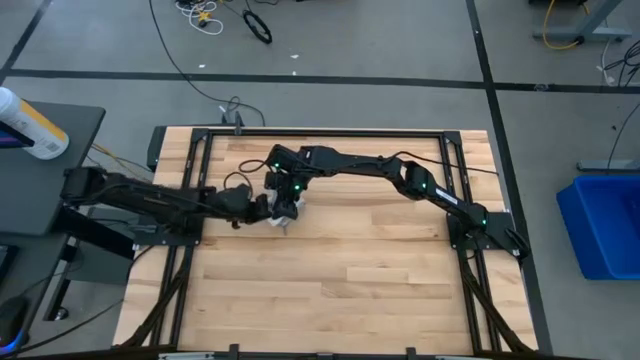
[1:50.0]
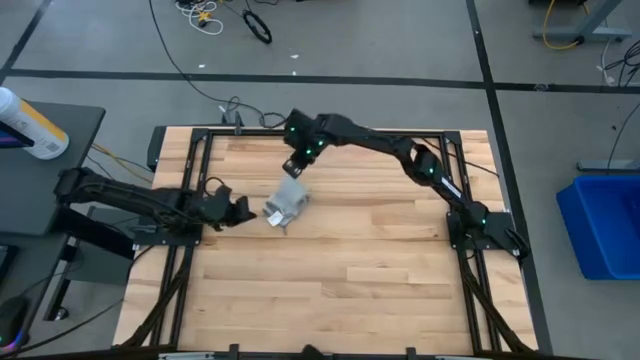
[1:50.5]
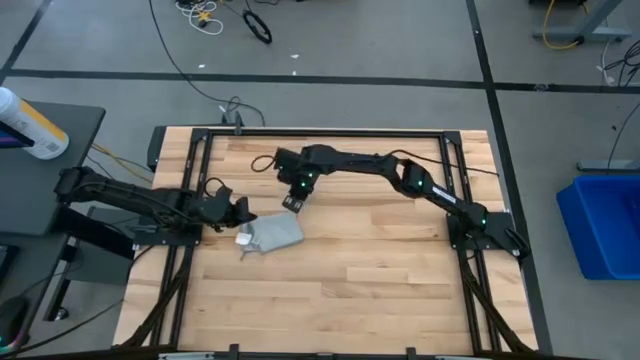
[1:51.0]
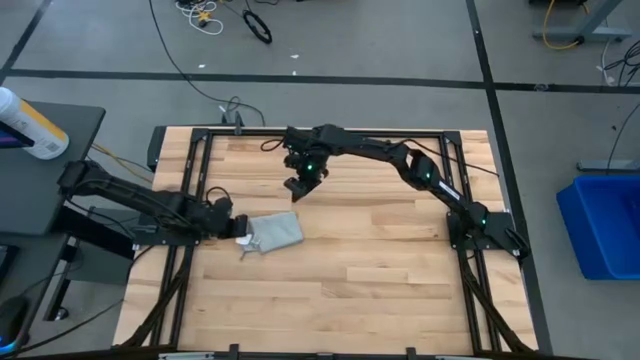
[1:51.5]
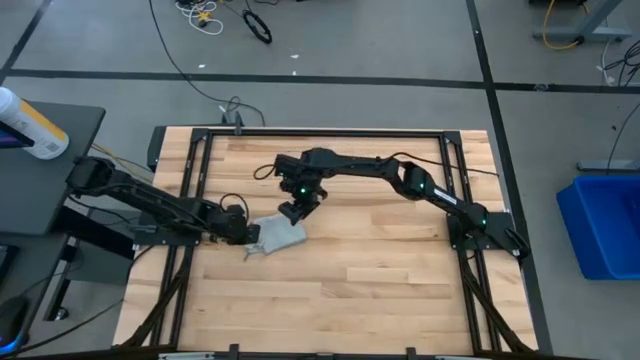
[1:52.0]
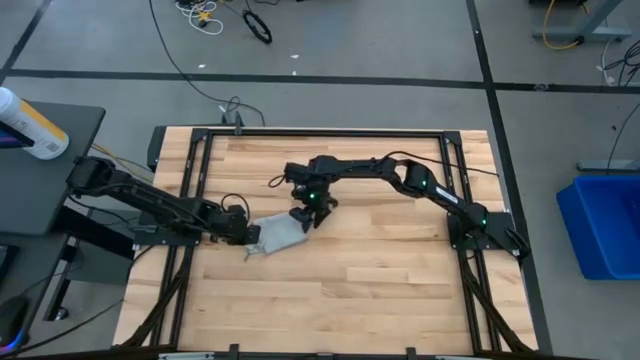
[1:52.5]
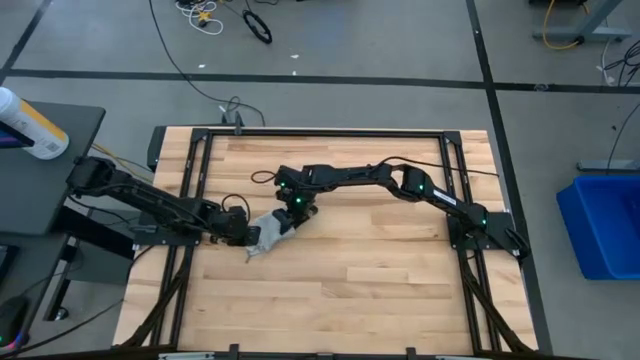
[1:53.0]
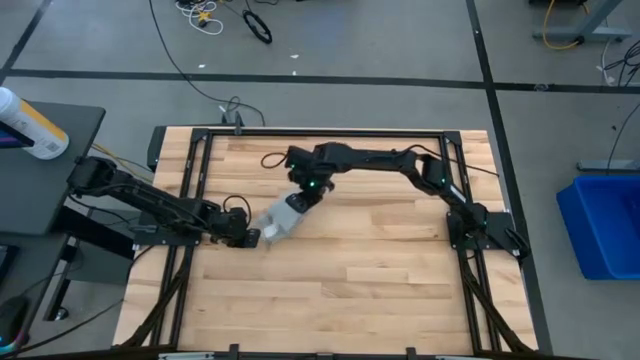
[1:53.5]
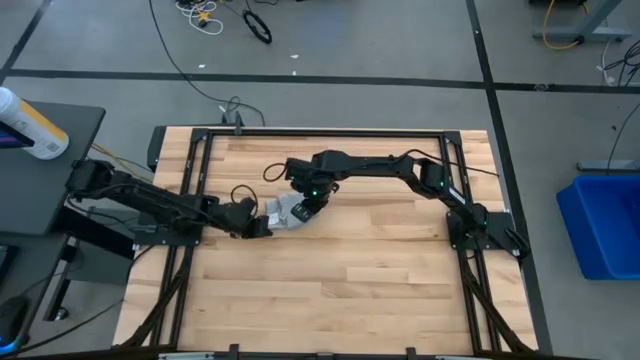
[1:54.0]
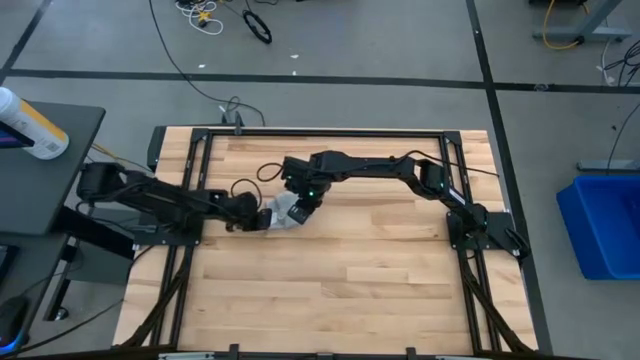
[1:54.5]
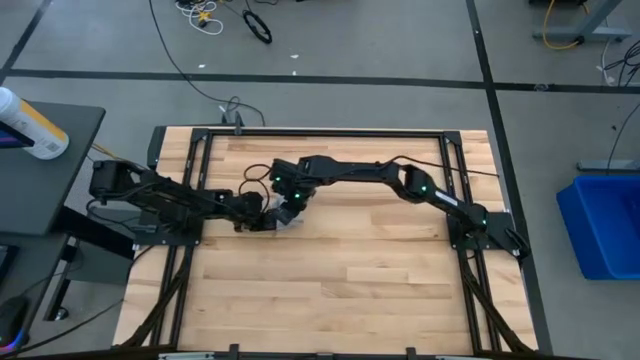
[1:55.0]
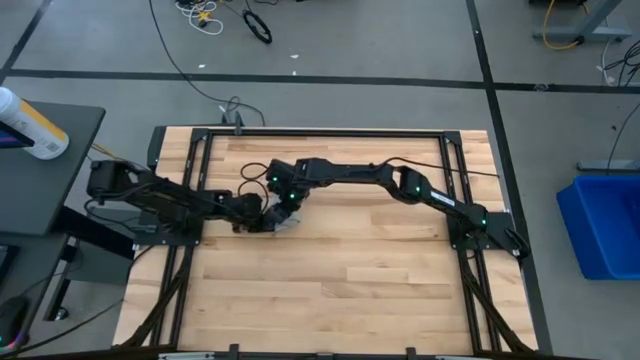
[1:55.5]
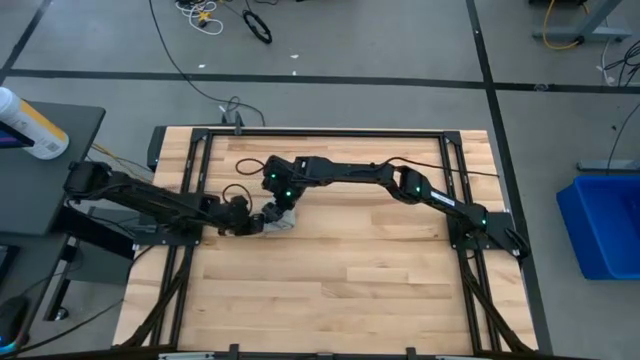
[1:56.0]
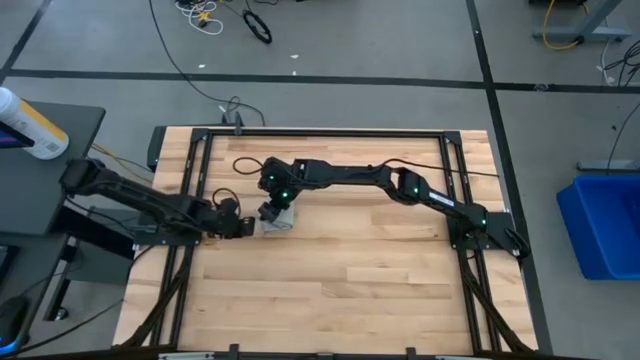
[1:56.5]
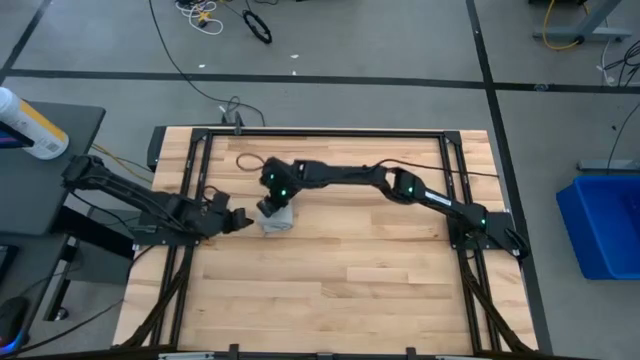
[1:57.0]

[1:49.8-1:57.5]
Task: Fold microfiber towels
Fold the gray microfiber towel

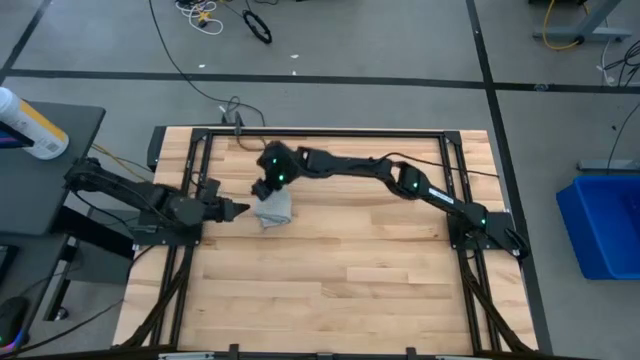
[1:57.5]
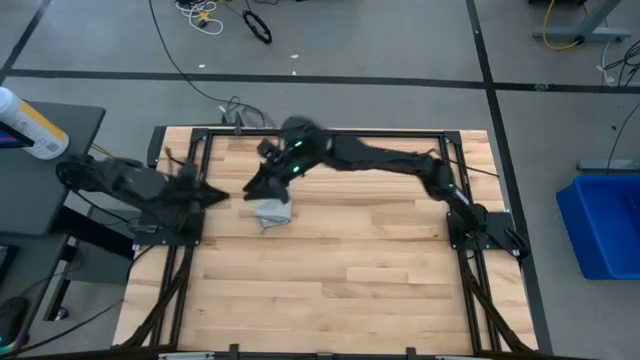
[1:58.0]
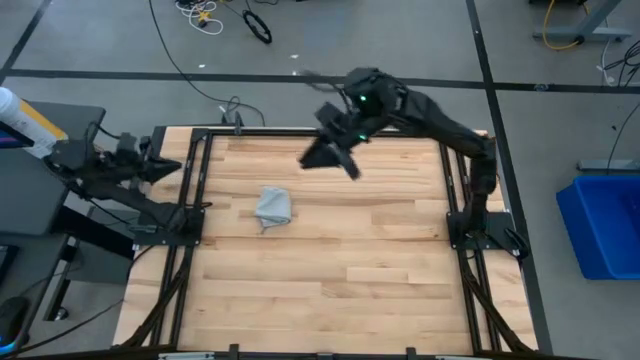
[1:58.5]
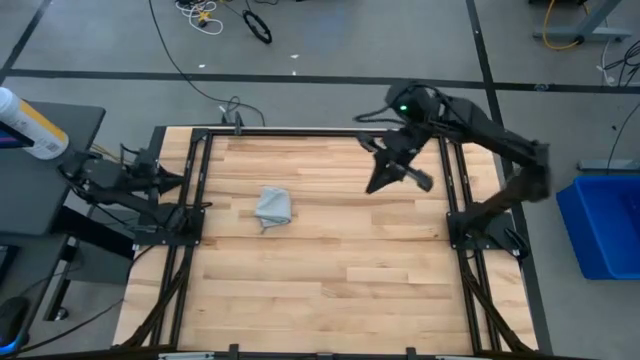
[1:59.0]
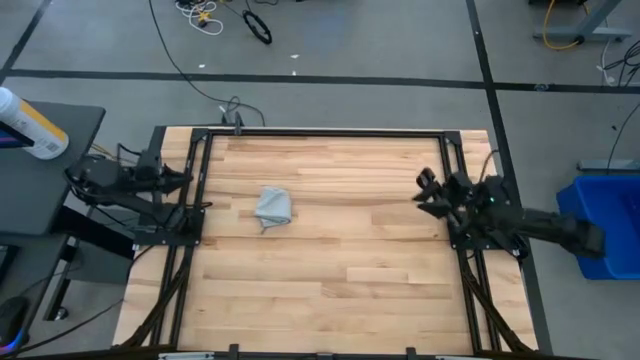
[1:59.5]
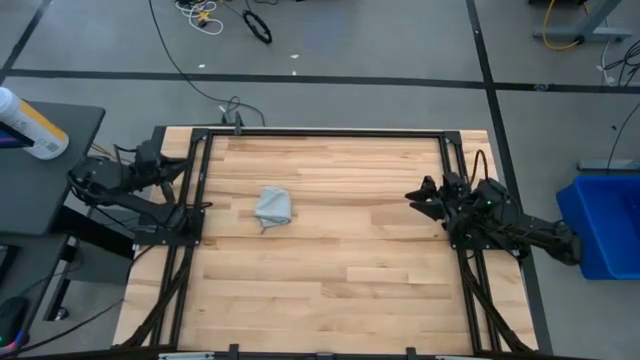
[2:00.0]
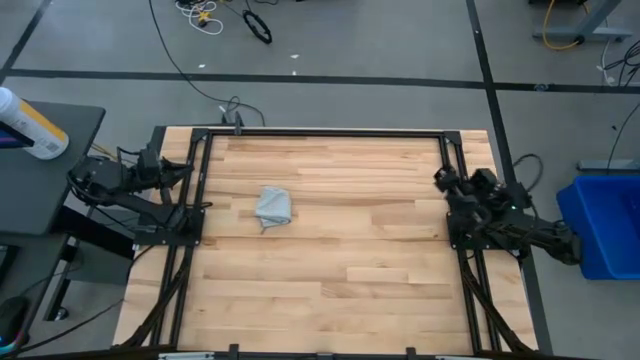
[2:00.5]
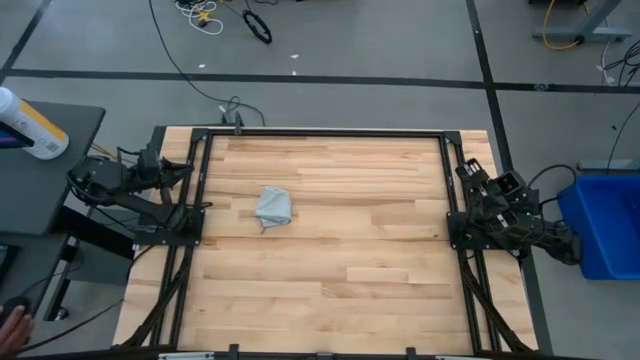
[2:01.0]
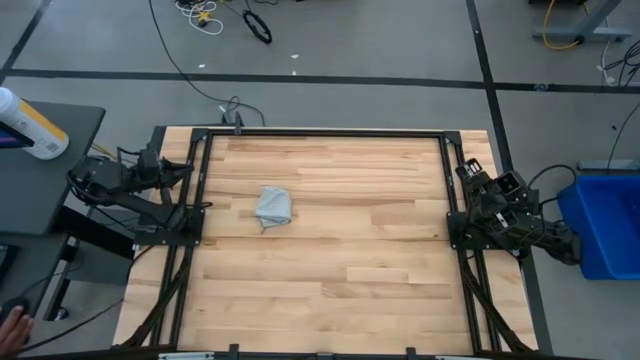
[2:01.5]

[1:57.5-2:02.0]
Return to Home Position

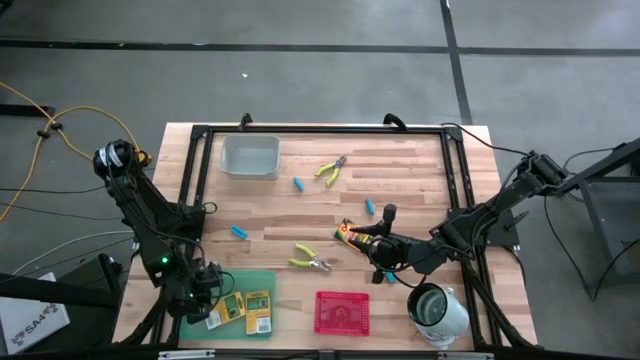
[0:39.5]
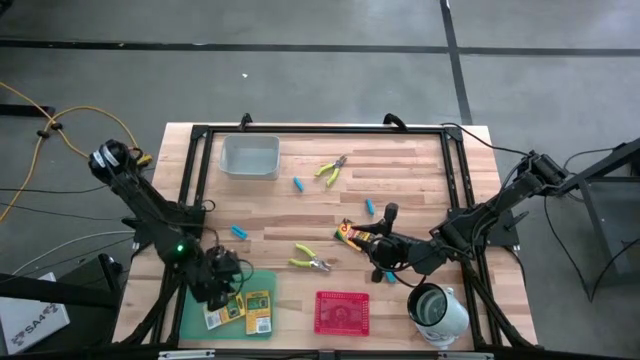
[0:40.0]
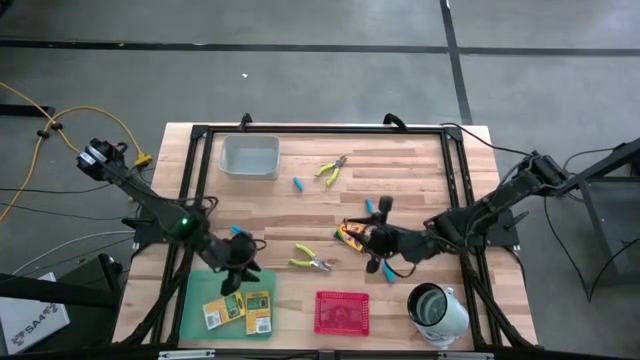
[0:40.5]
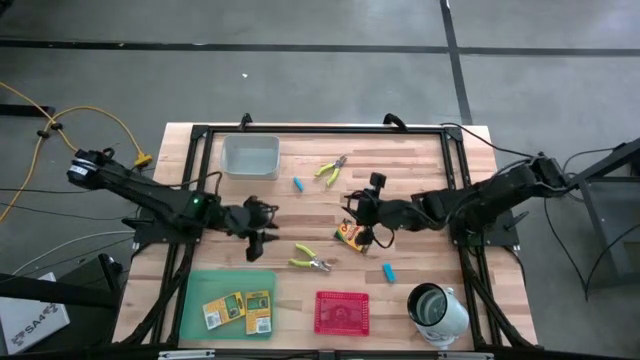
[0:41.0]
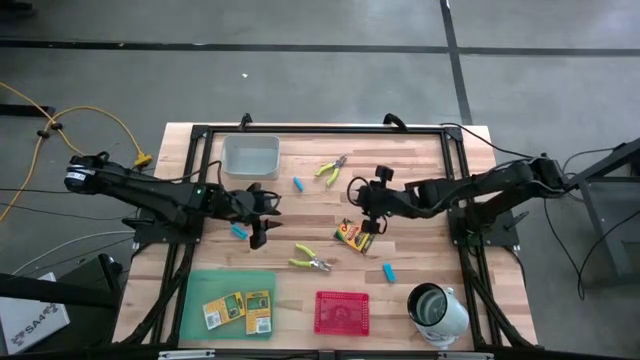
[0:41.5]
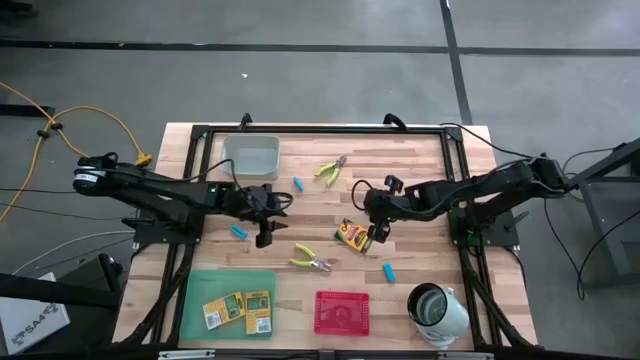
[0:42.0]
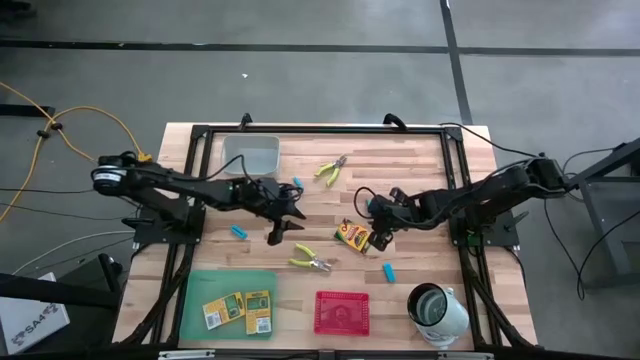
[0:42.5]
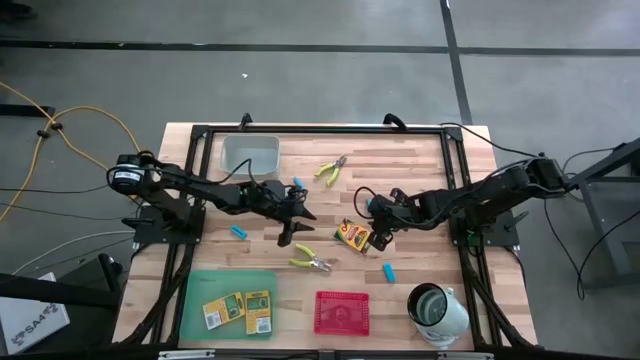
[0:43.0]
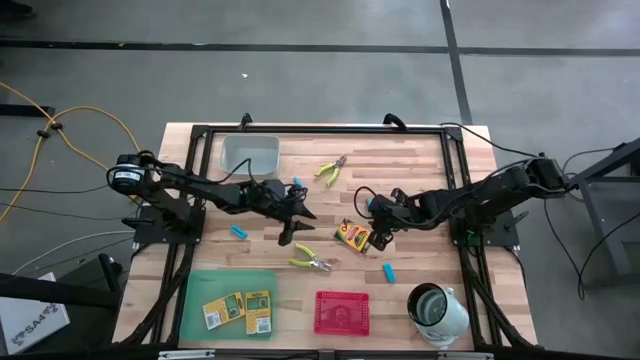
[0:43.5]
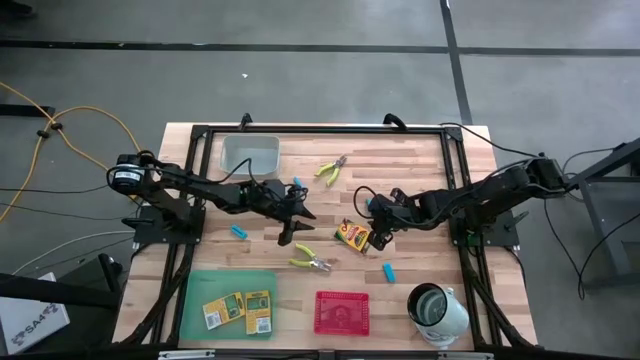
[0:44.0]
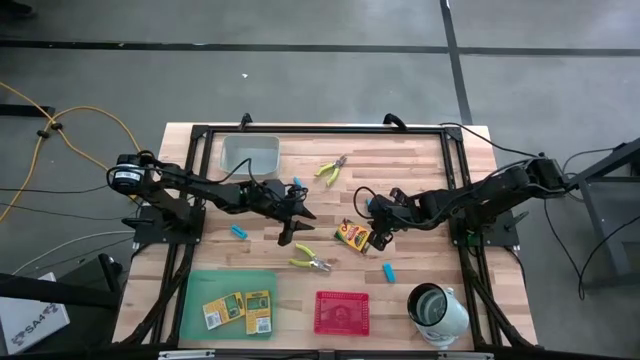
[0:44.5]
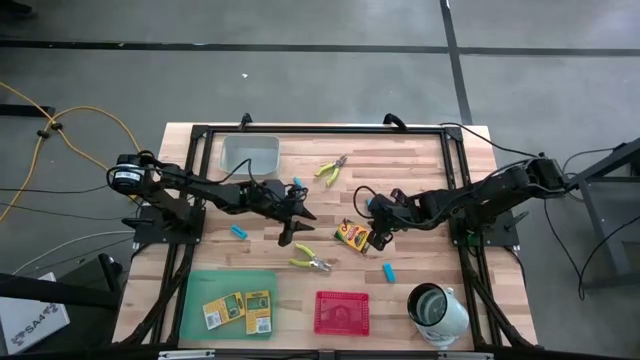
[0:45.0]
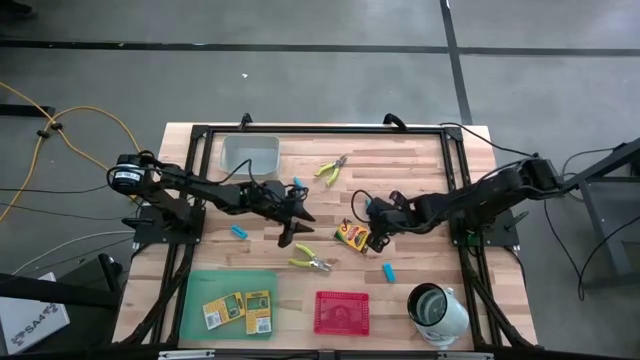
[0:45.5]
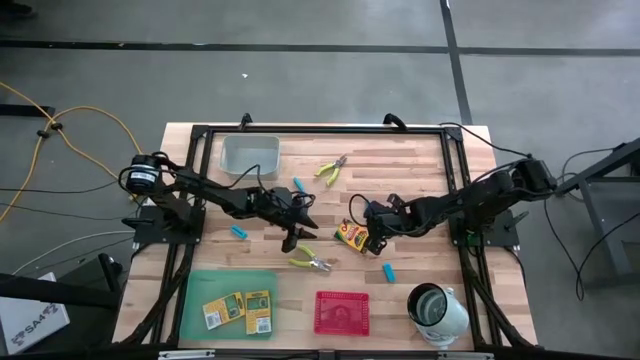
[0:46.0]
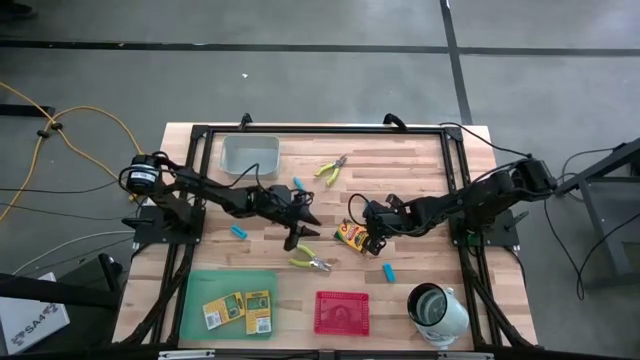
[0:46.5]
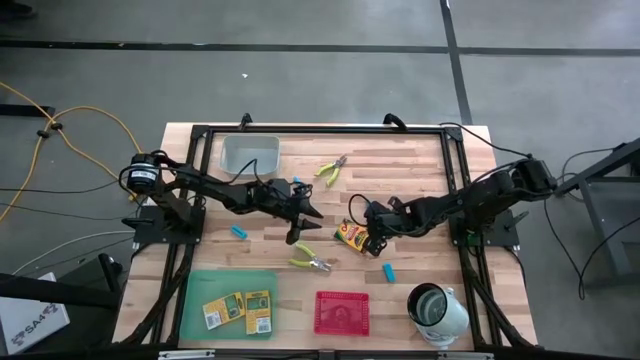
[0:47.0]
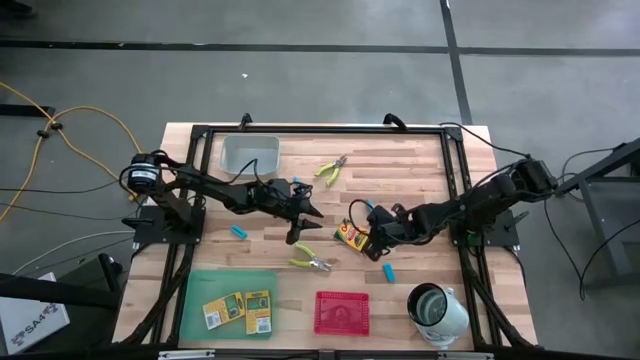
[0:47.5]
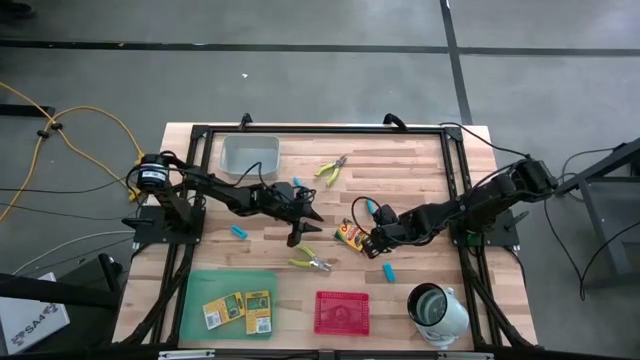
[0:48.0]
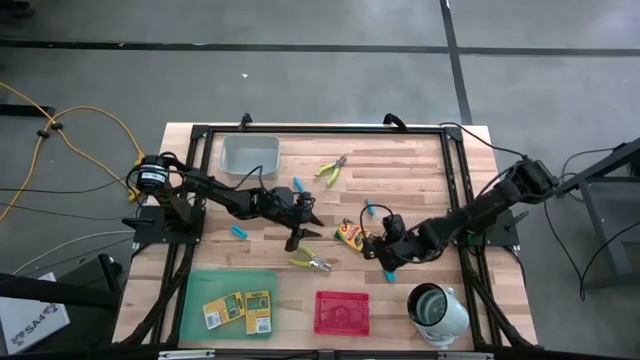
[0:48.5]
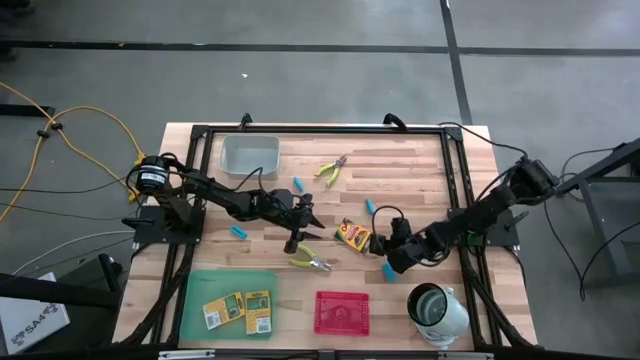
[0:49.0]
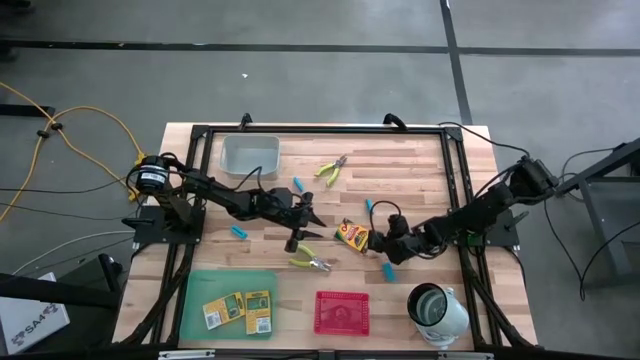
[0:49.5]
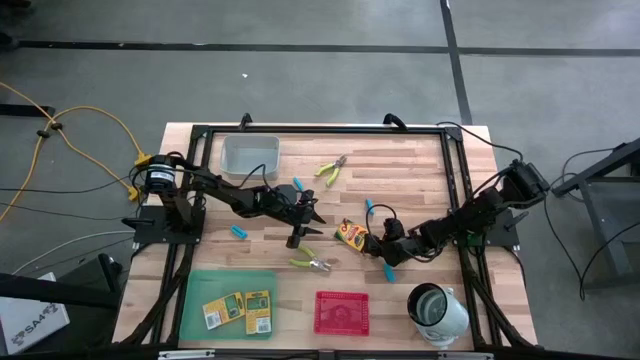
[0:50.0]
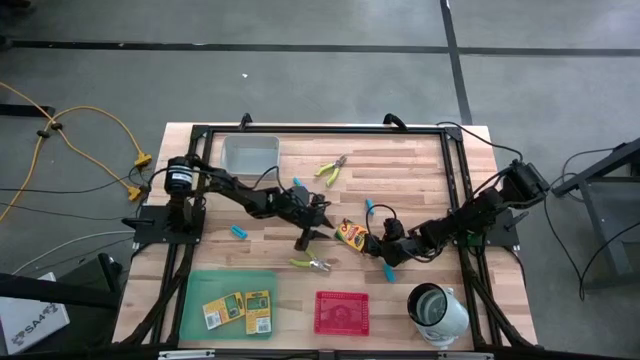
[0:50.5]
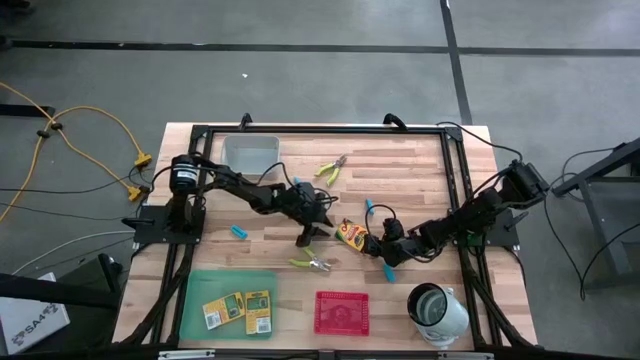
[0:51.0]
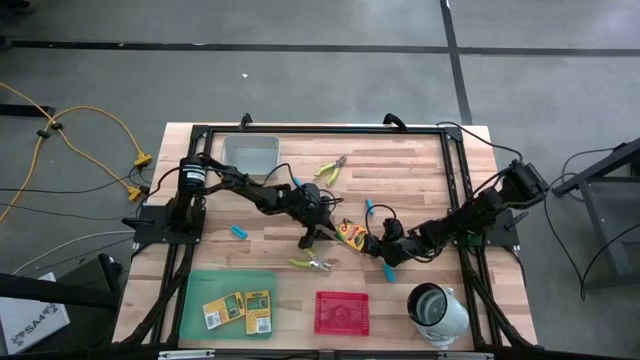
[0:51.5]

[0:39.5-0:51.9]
Task: Pick & Place School Supplies
Put the yellow crayon box into the green bin
